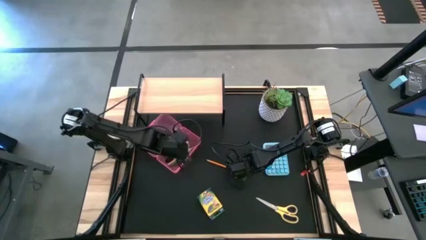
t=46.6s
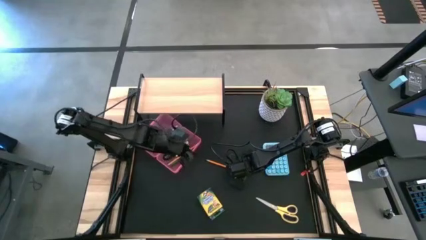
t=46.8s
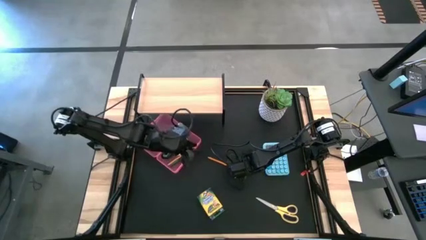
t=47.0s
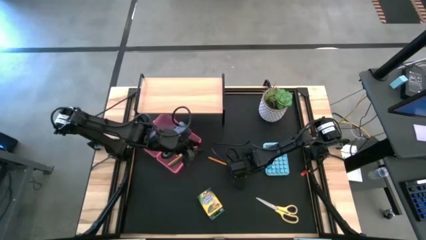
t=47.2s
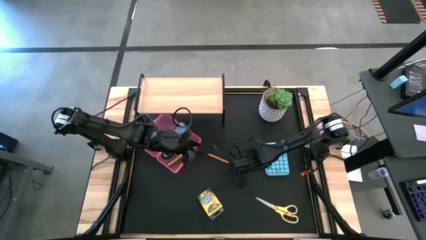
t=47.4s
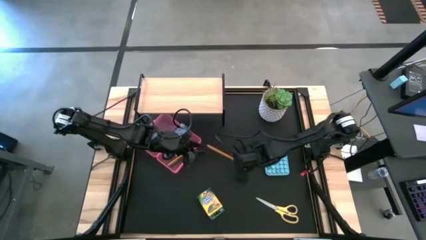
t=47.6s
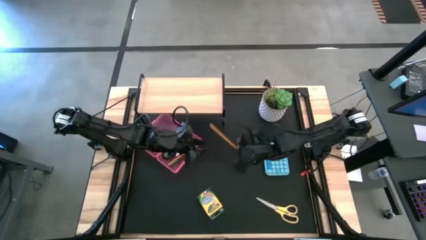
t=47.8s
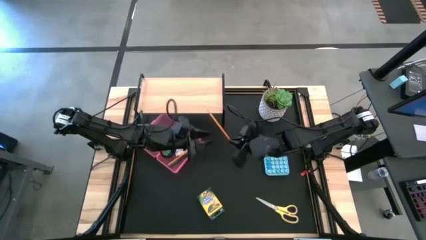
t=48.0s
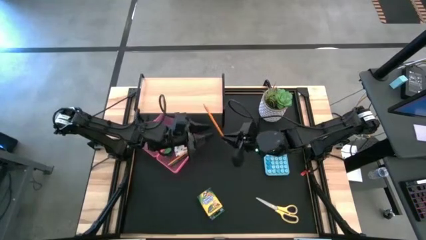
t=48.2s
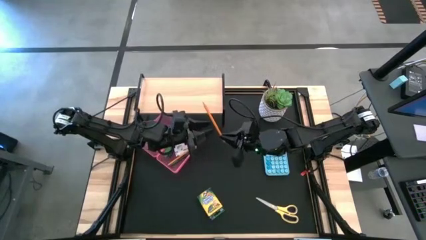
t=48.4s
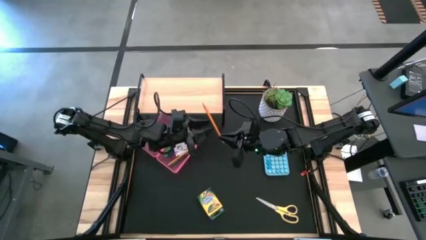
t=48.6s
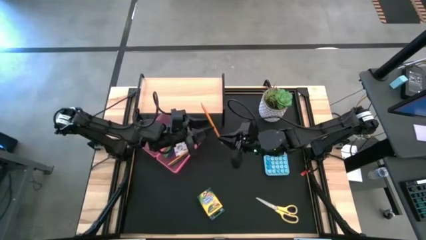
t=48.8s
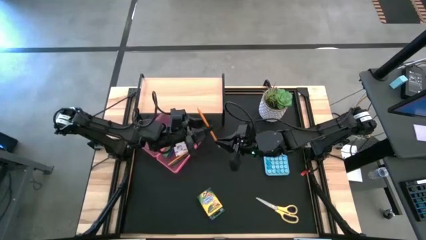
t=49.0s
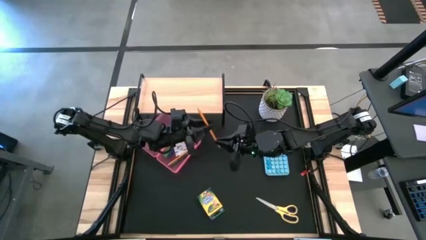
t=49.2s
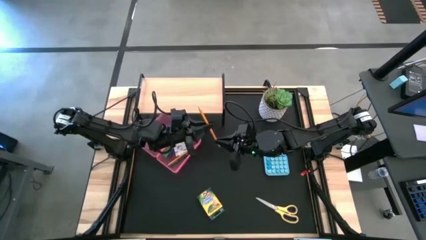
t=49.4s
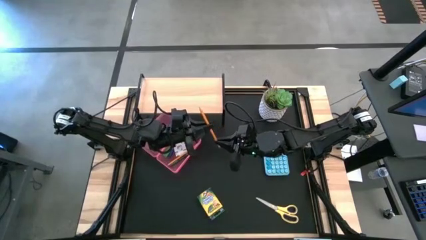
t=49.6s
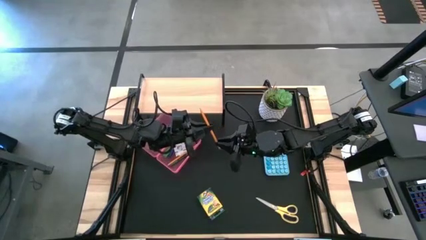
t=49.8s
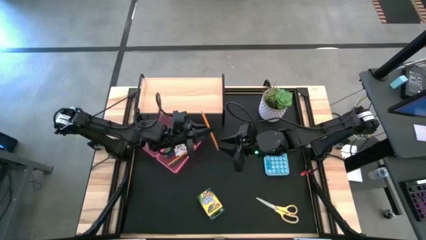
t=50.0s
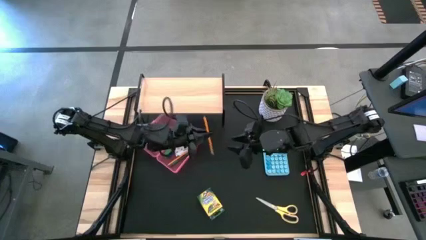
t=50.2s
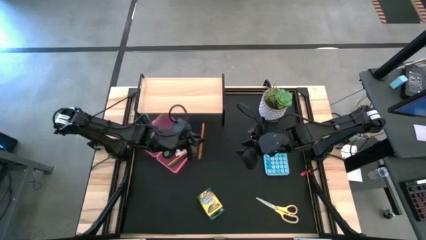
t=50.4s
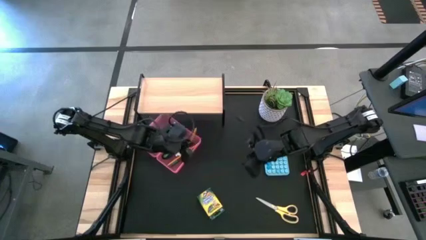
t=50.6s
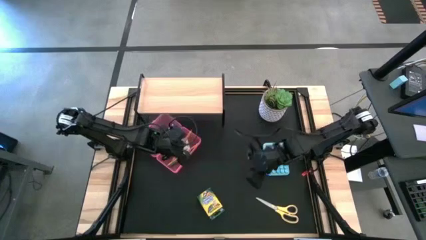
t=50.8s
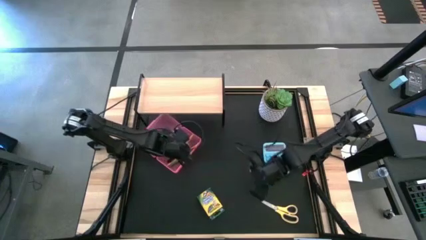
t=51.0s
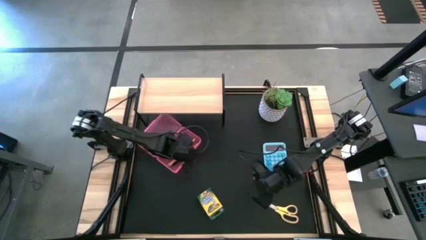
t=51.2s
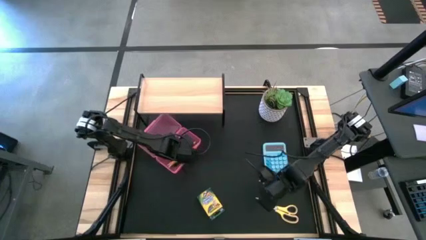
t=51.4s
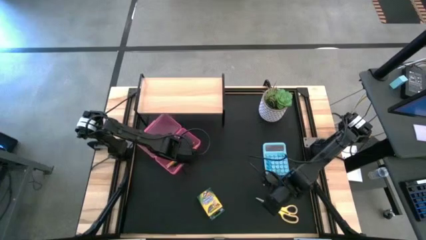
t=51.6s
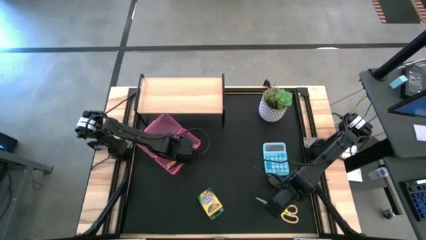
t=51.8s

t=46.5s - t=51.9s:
Task: Pack school essentials
Put the pencil into the pencil box

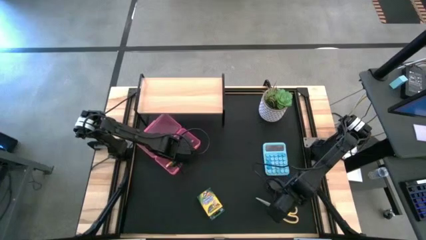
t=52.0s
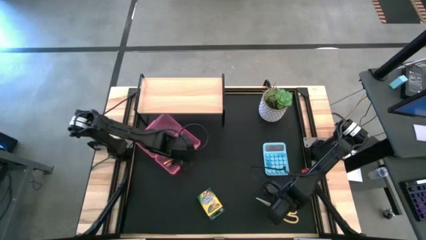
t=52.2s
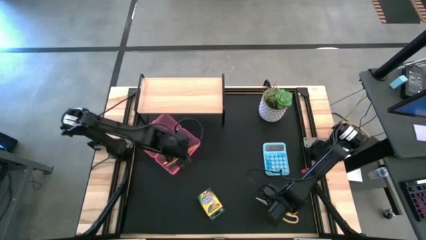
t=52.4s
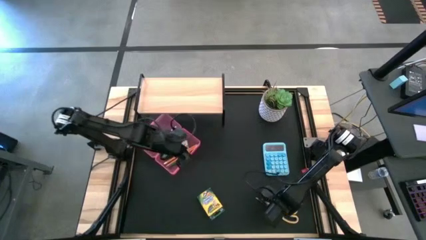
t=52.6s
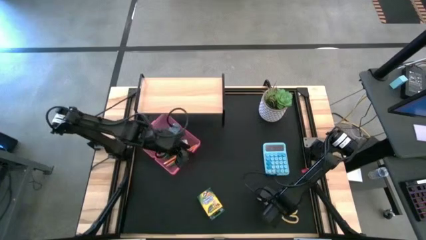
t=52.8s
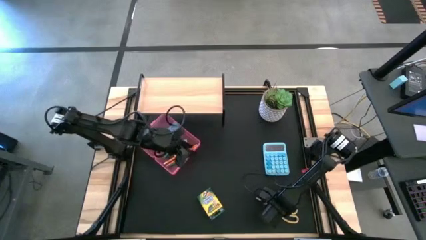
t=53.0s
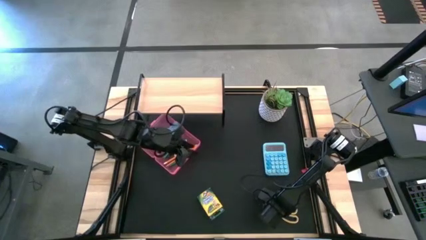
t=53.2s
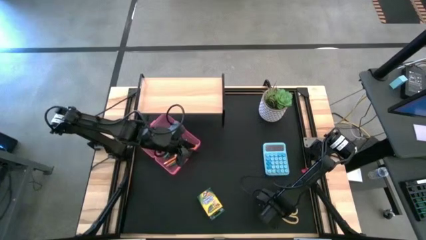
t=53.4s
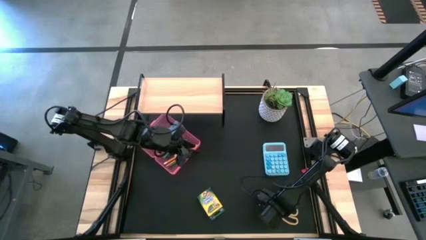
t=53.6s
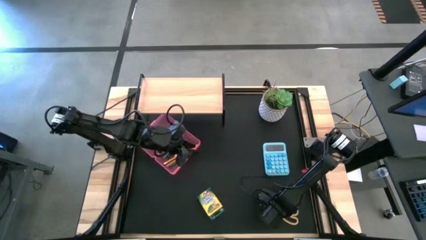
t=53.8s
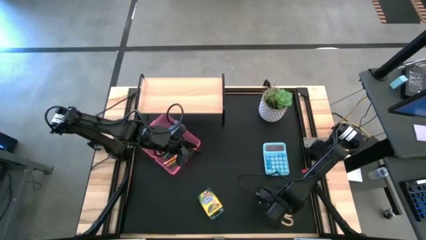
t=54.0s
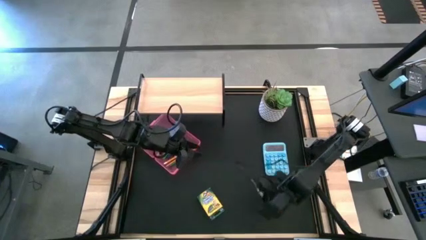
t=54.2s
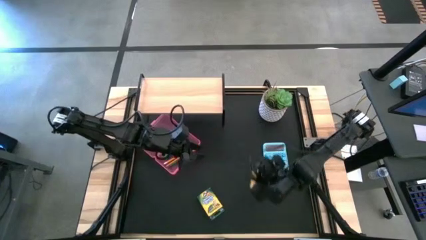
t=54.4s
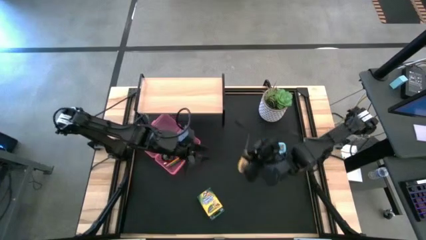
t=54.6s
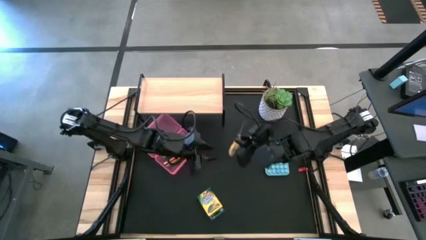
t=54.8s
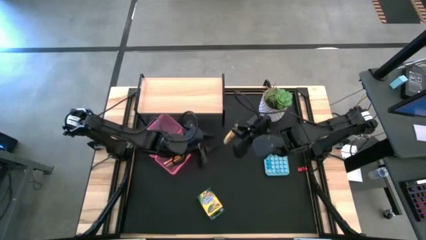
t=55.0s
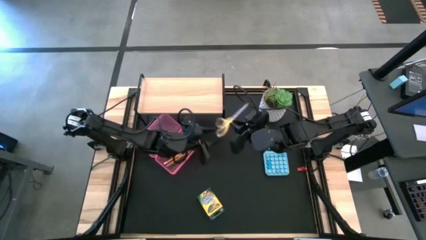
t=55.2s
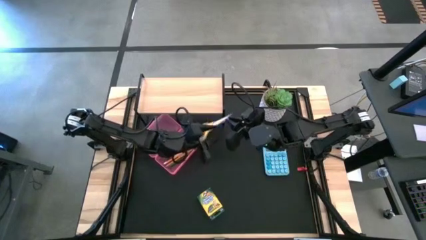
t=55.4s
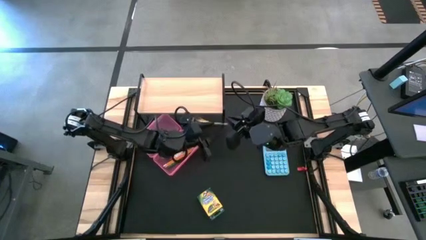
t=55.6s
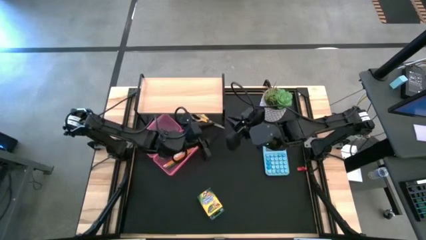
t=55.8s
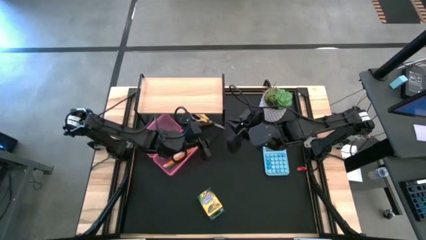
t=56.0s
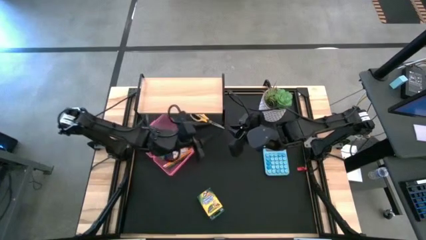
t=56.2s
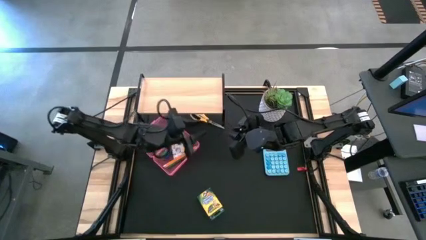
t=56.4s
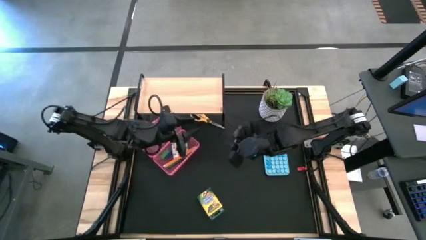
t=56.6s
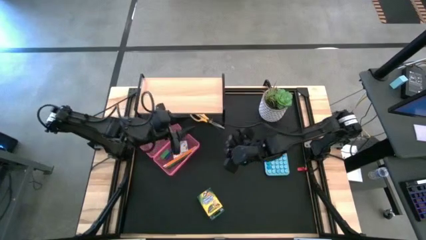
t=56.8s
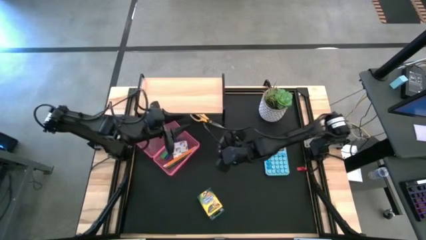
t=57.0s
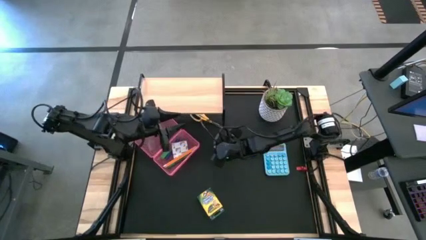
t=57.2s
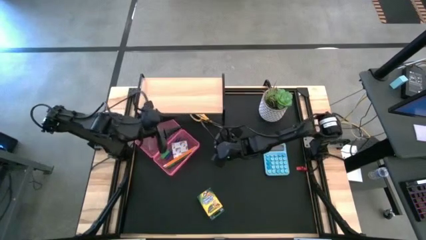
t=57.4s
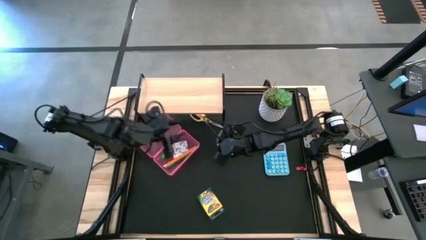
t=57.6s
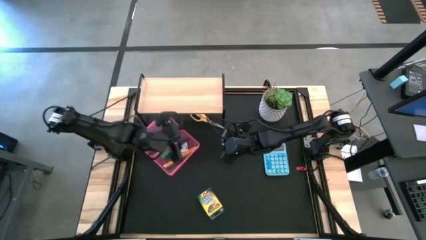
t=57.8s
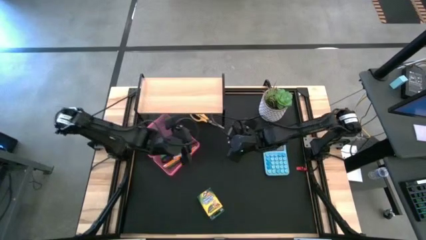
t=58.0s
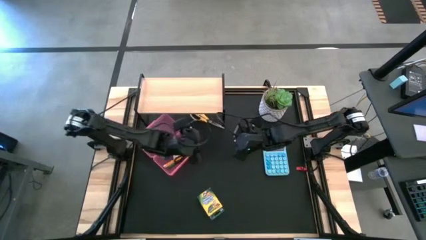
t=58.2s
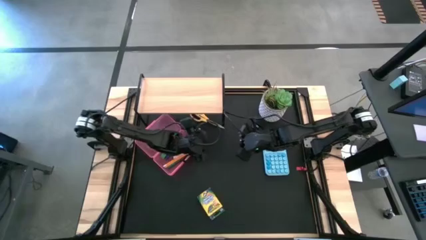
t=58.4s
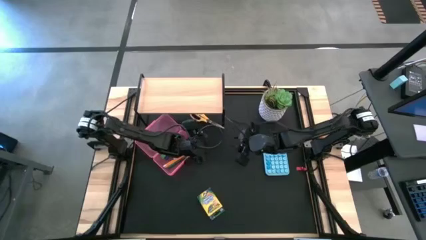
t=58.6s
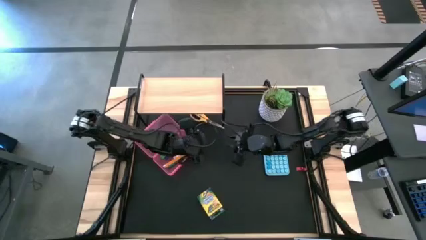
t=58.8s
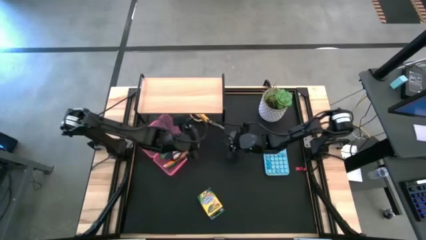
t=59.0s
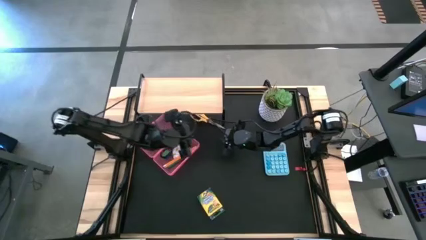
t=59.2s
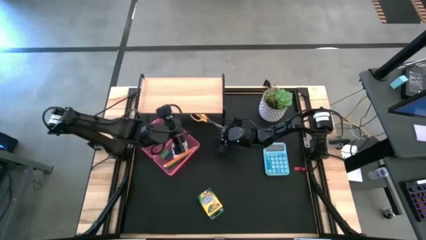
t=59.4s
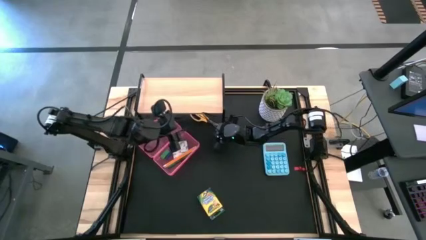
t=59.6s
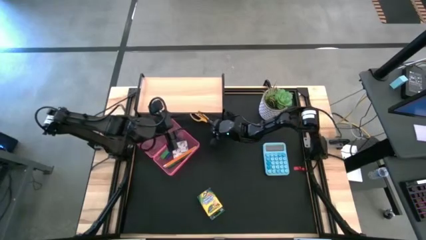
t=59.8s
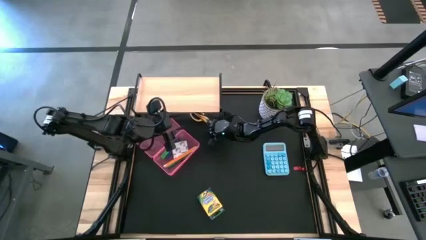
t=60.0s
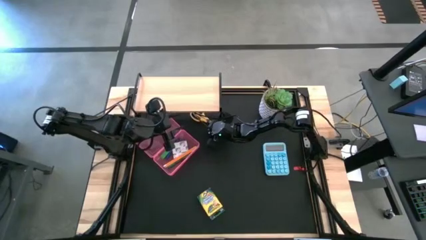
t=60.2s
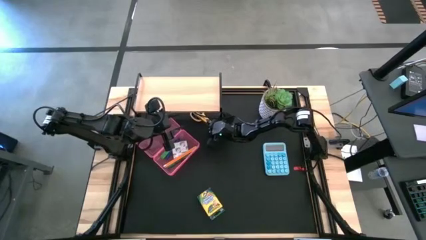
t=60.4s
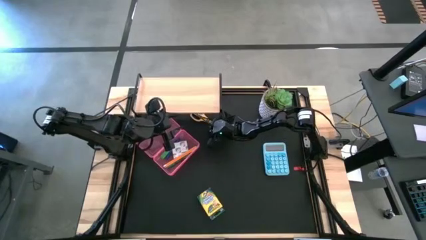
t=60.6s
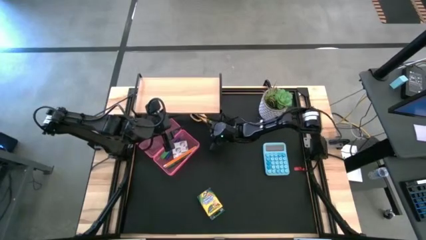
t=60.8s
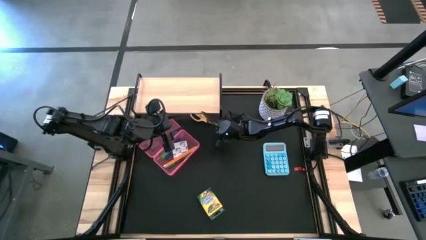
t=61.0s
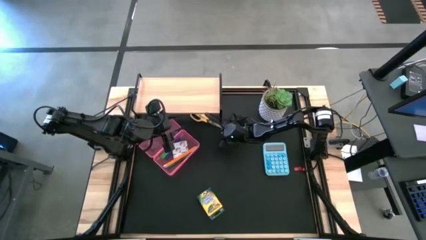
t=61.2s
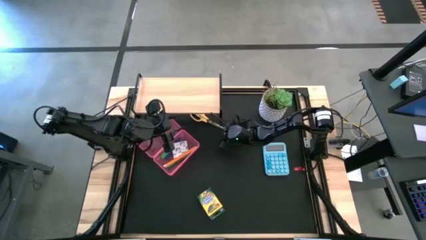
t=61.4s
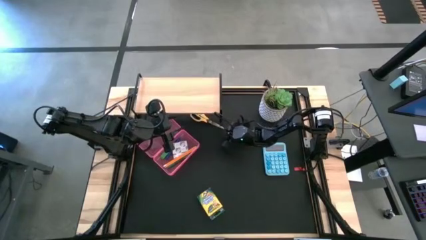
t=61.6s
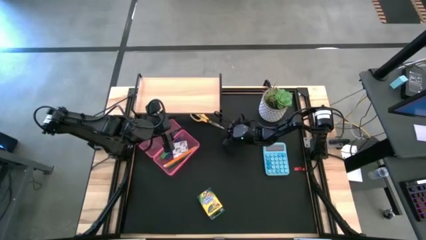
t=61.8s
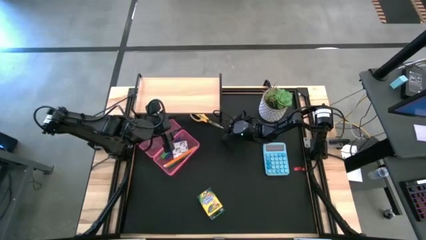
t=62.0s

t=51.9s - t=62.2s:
Put the scissor into the pencil box

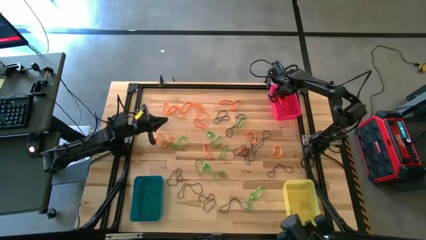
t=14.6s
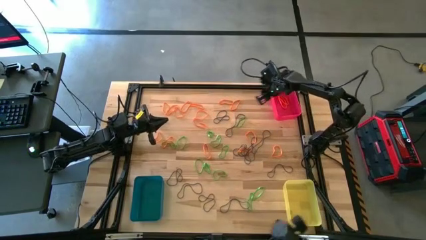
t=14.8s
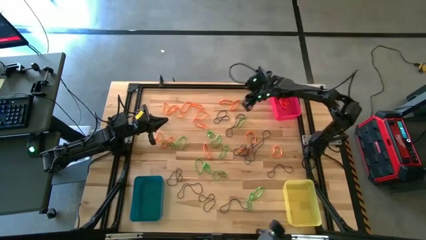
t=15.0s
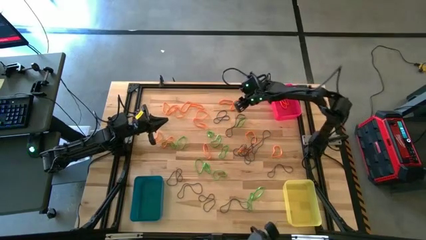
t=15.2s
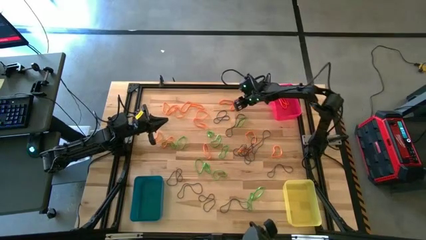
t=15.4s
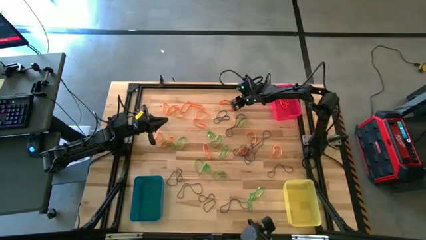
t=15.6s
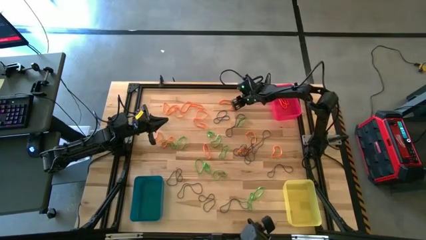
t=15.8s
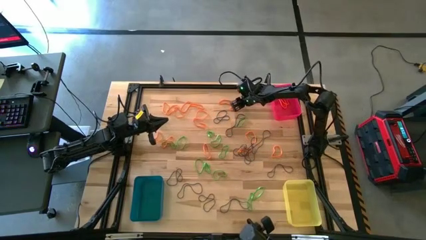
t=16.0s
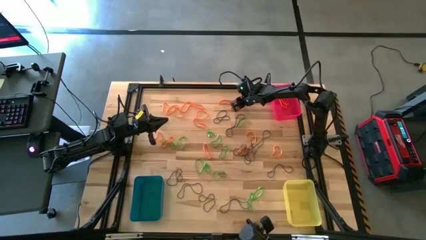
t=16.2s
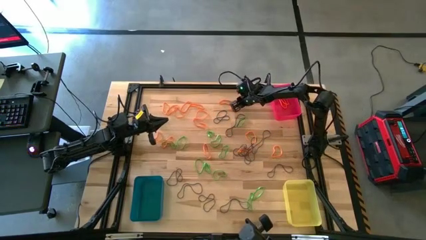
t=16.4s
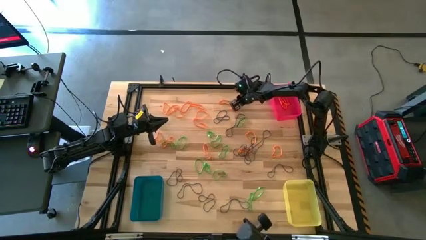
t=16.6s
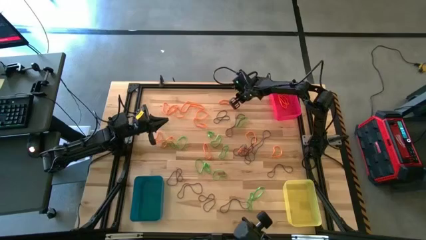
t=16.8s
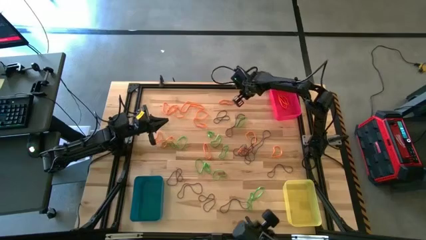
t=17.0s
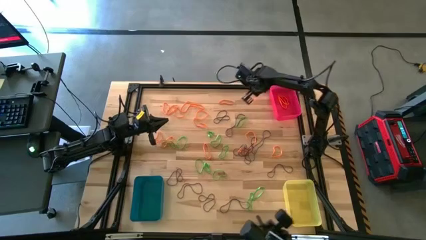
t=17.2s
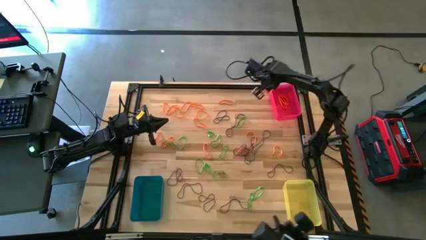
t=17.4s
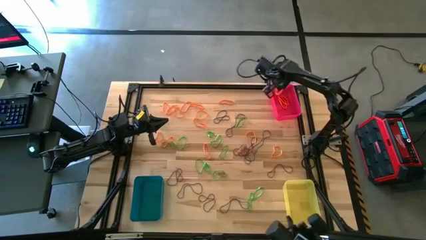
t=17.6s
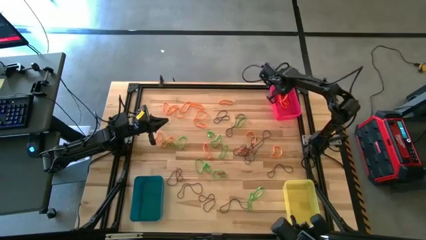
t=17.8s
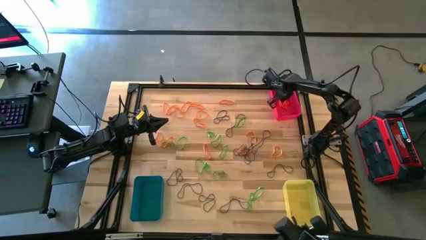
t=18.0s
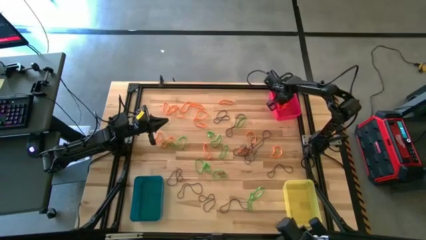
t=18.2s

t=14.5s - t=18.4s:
Task: Sort rubber bands into baskets
Put the orange rubber band into the red bin
